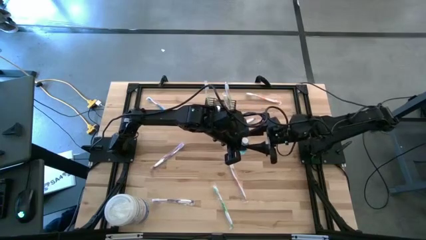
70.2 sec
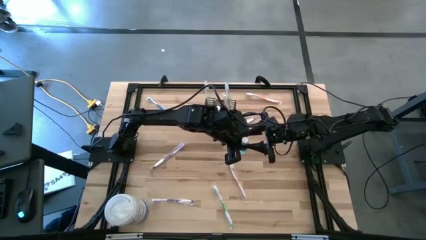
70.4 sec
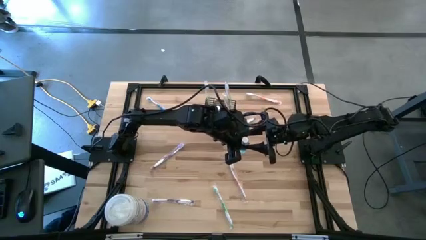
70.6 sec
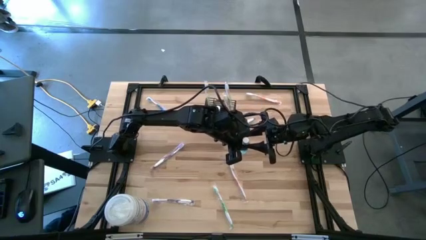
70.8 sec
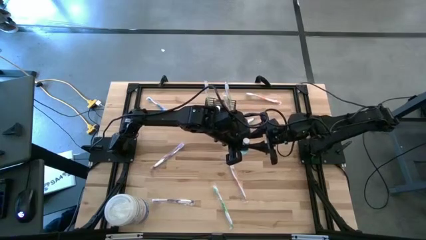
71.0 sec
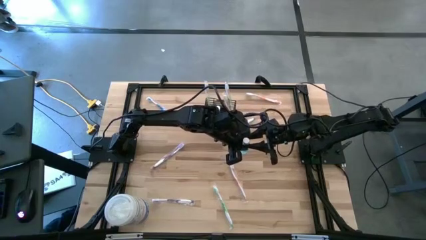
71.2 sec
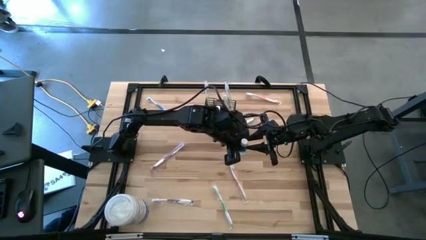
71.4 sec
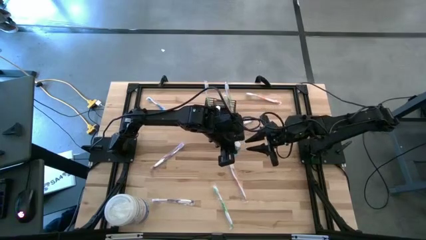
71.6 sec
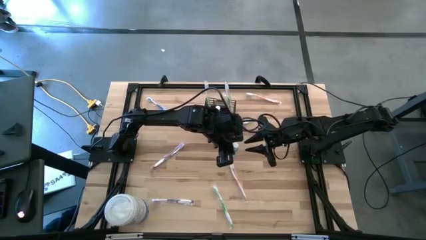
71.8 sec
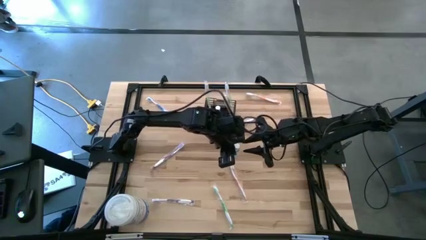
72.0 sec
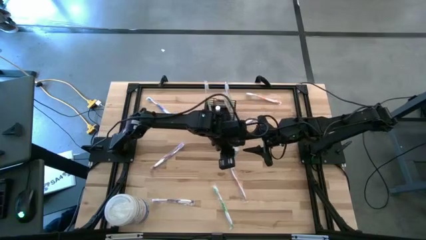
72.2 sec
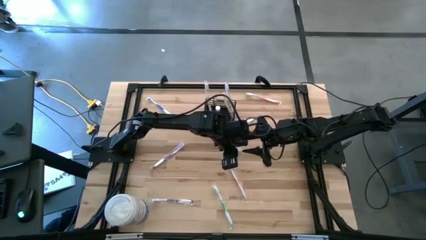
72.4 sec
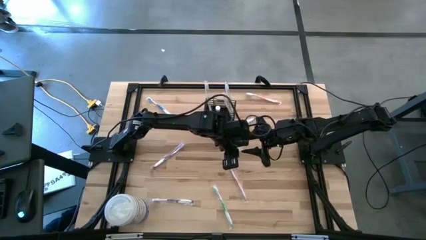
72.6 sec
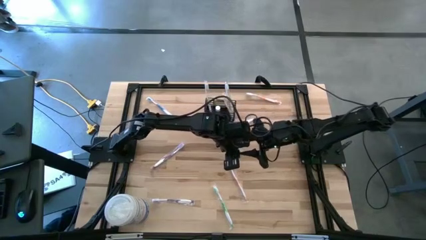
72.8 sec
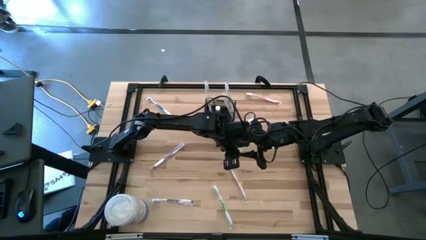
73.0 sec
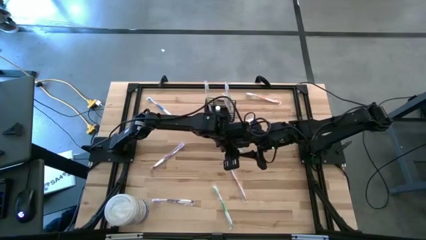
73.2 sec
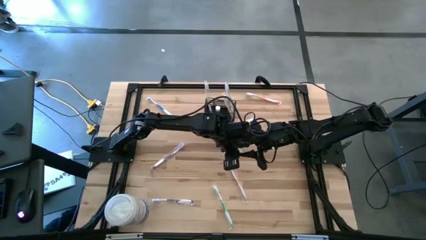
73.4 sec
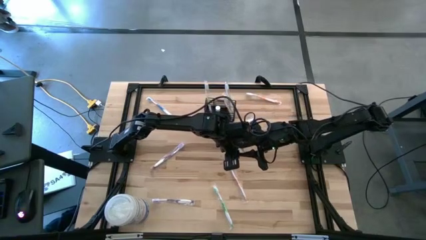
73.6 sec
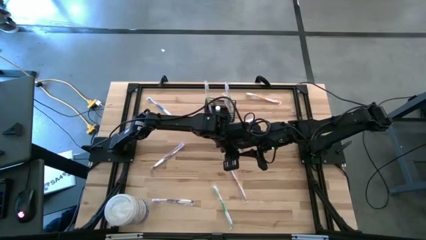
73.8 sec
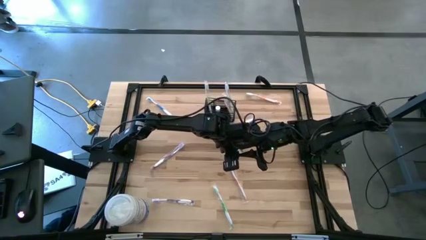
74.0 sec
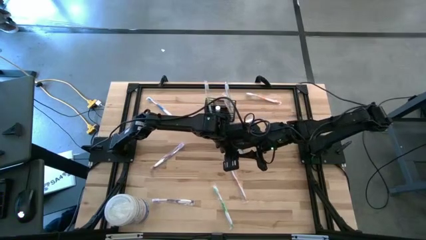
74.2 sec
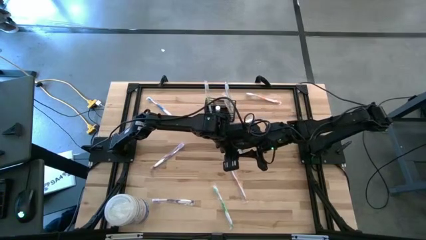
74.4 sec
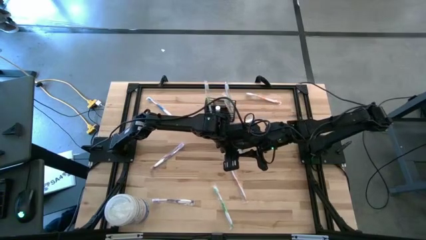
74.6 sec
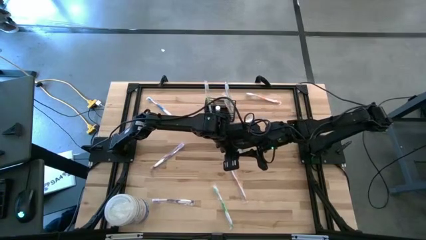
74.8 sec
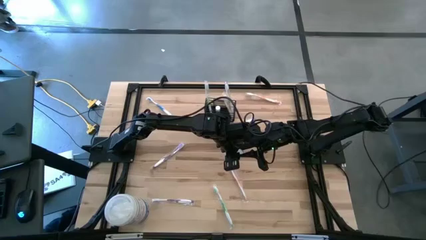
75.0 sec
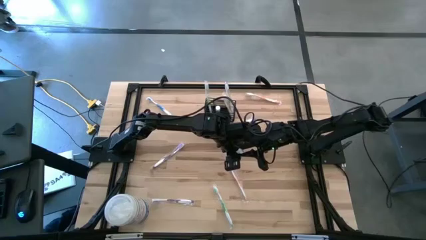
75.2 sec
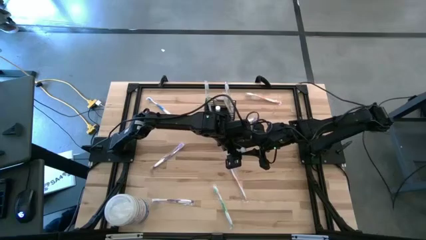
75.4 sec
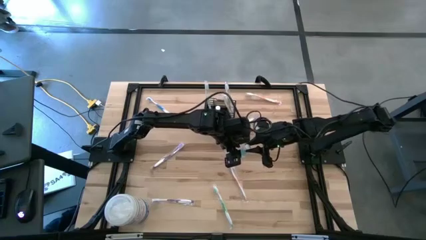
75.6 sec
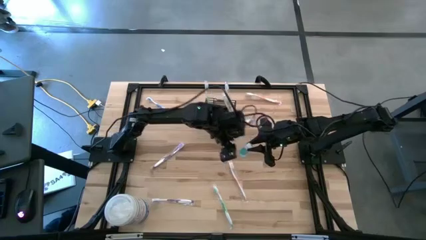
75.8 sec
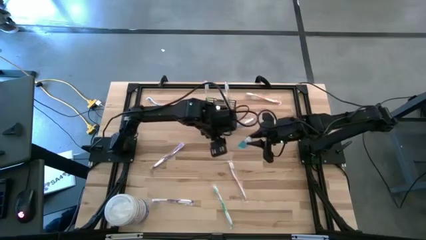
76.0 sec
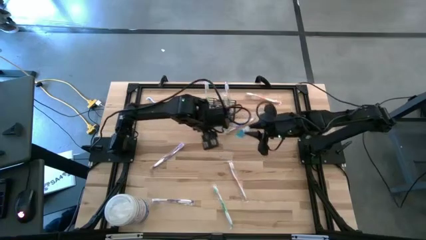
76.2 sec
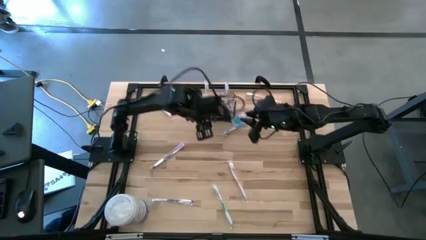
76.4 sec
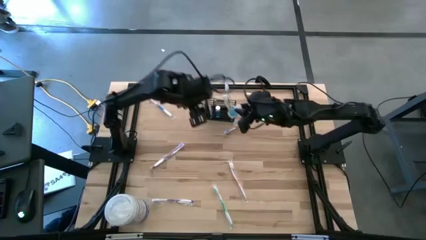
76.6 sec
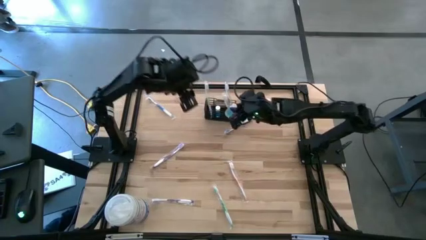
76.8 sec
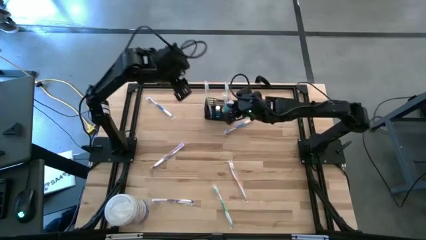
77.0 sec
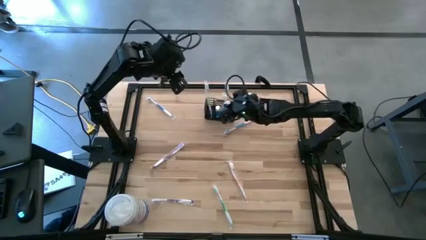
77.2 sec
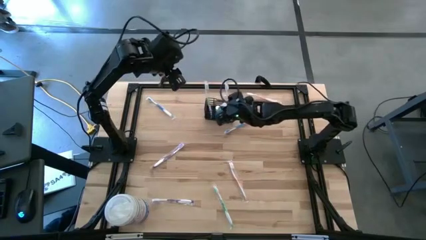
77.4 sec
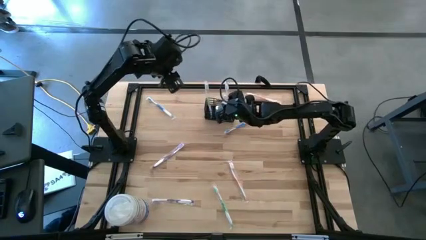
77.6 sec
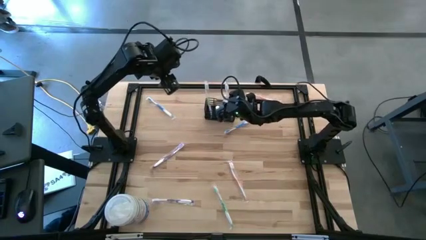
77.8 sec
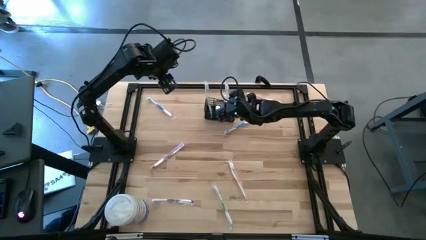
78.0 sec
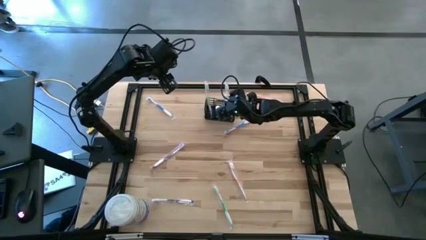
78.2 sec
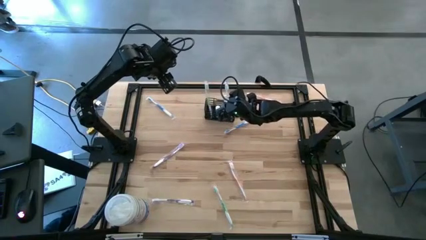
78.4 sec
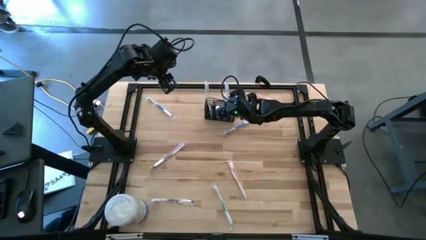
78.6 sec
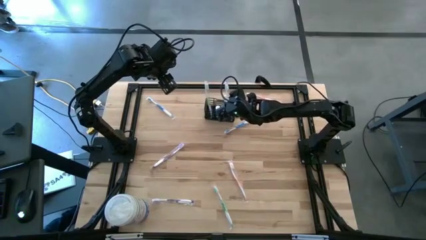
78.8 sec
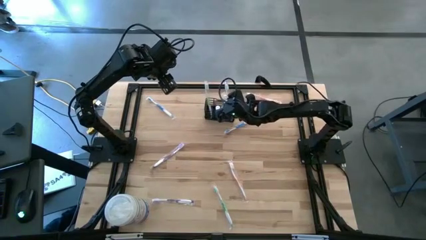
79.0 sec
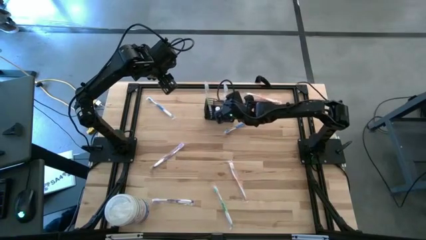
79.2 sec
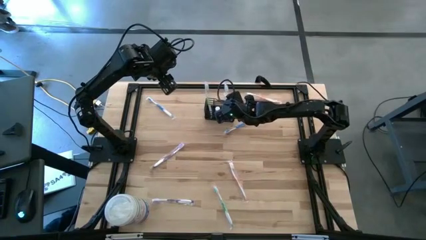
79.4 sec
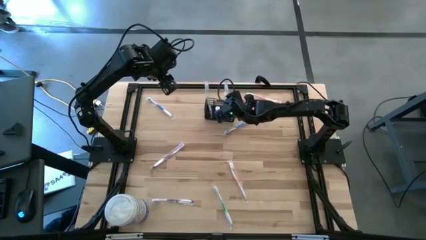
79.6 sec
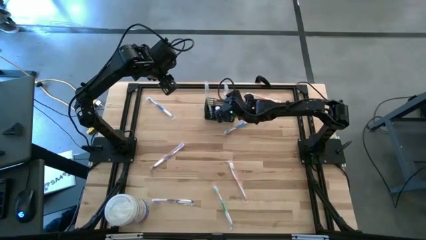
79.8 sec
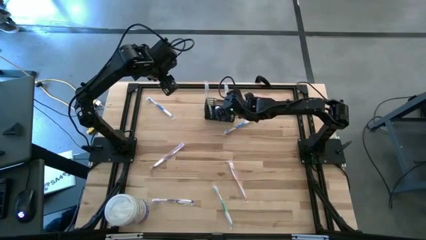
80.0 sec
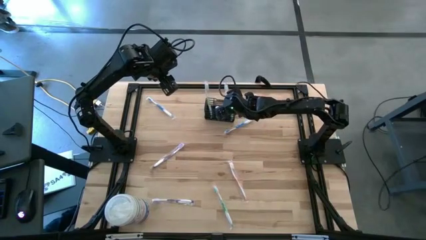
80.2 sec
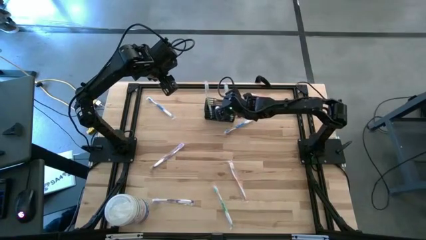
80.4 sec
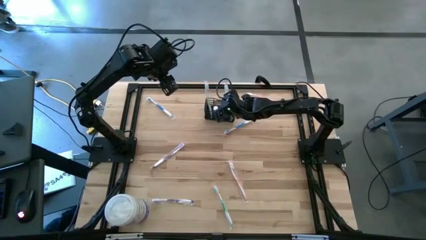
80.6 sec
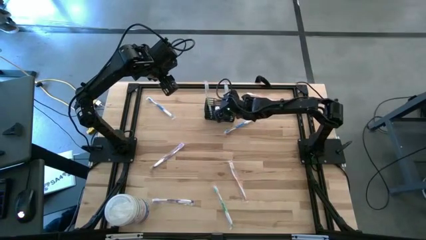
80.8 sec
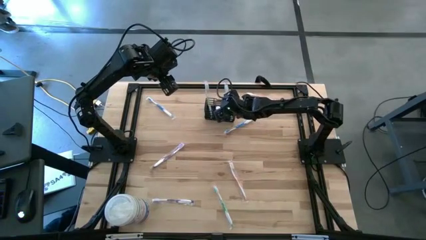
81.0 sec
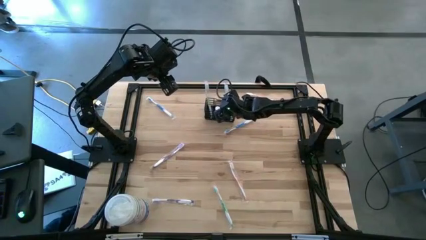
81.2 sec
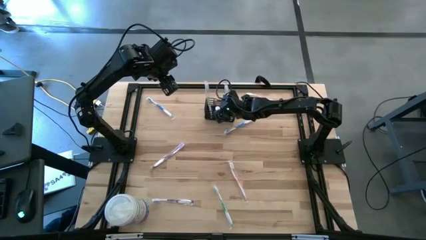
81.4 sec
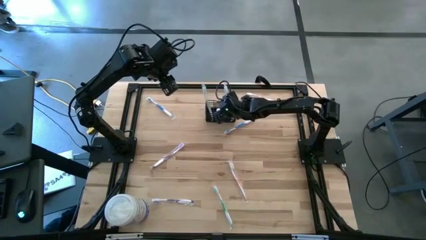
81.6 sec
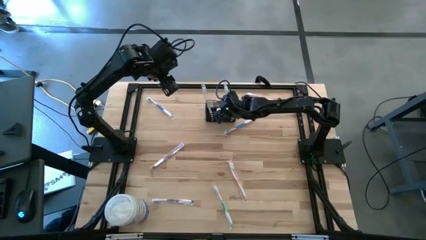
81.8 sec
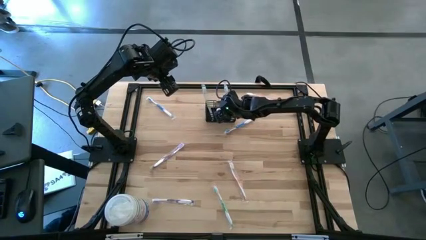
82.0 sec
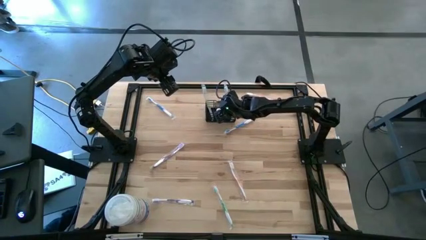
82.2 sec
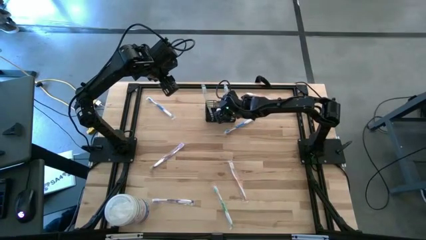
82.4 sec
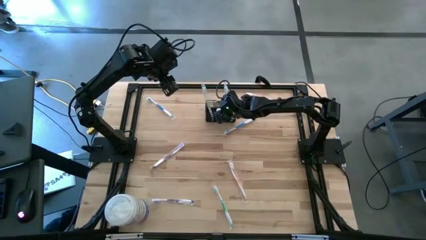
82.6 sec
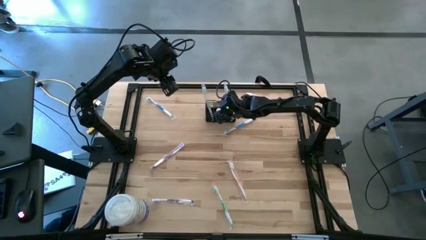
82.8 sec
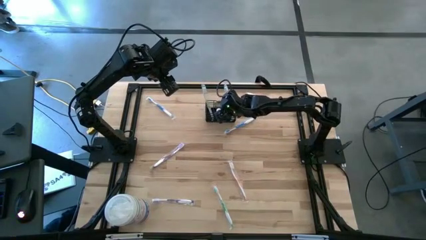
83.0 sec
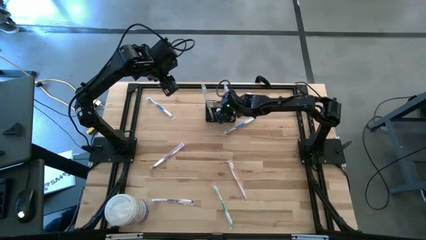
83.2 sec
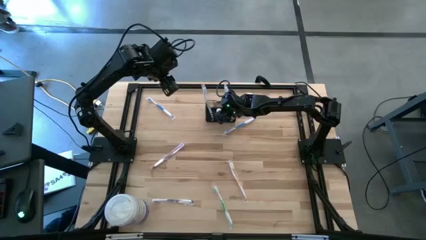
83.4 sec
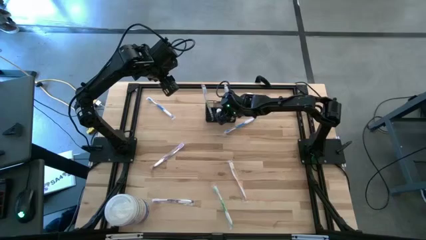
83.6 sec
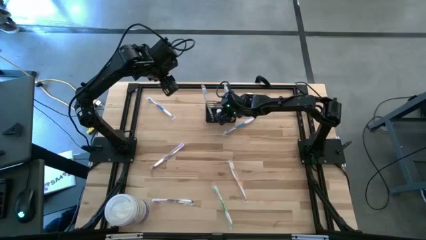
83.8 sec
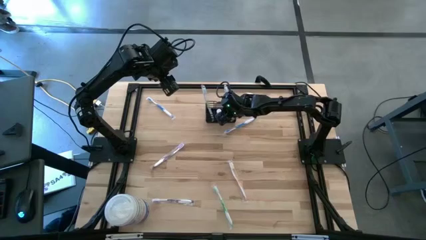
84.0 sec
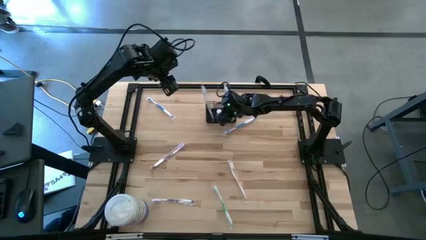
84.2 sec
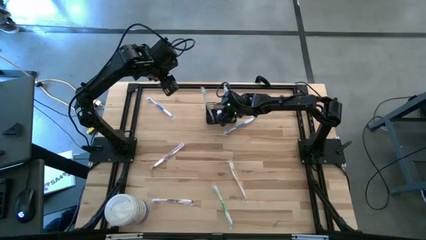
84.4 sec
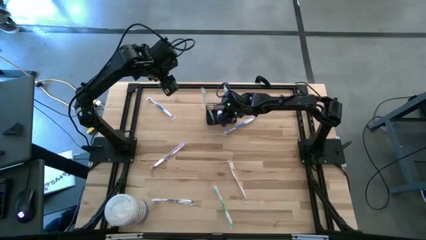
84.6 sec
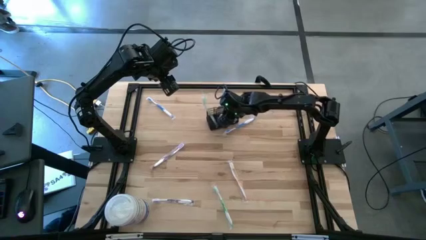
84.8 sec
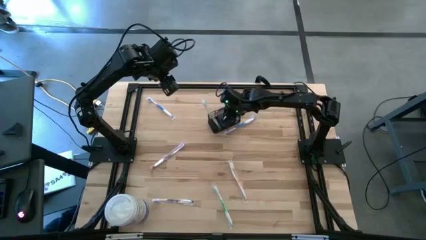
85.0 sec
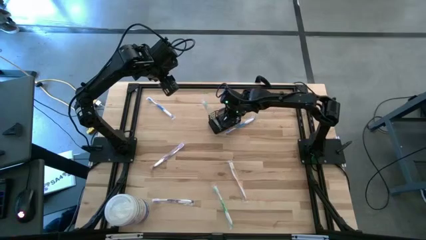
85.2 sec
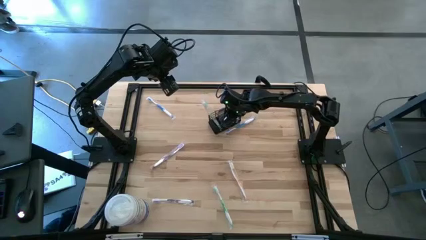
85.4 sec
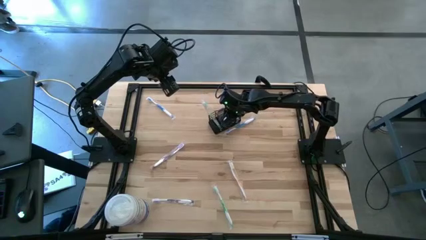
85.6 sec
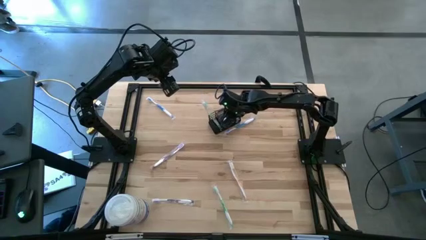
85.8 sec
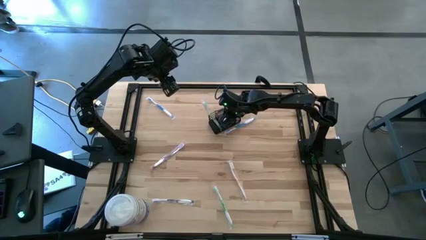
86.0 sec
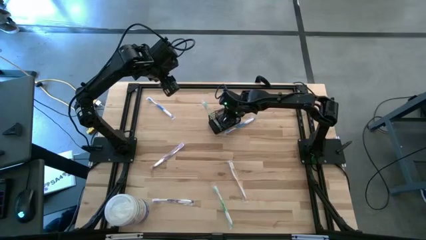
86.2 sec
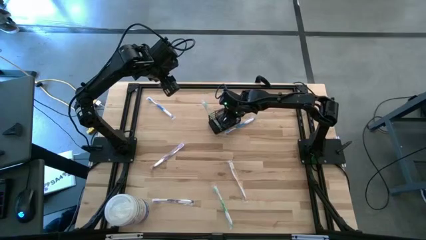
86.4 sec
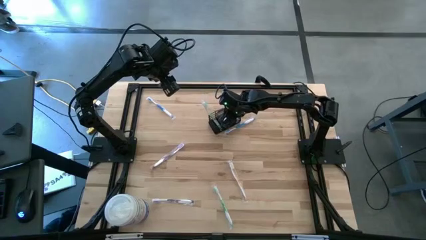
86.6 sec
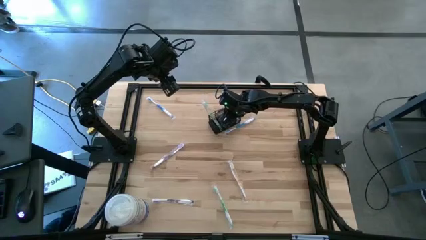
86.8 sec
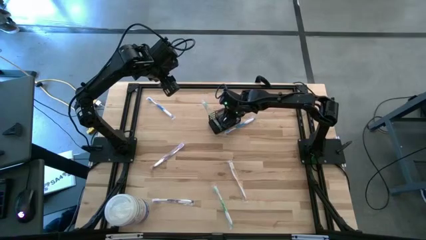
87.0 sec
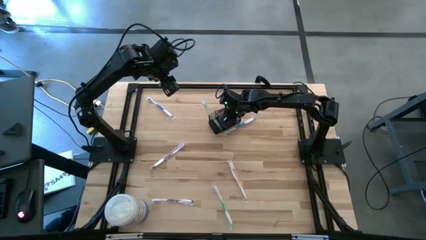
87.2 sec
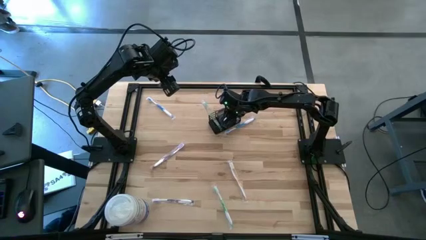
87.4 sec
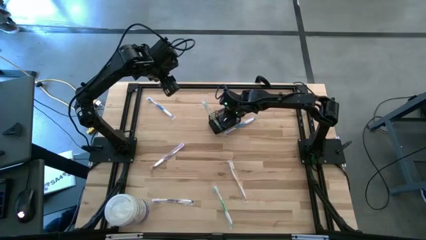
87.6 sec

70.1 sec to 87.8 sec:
Task: Pick & Place toothbrushing station
Put the blue mouthwash into the mesh organizer
